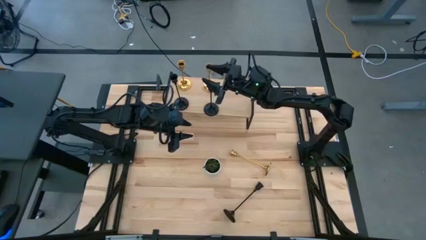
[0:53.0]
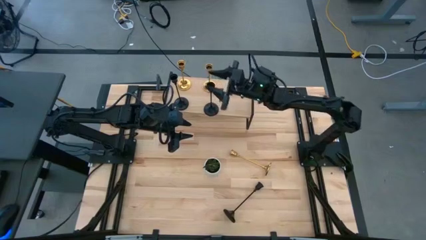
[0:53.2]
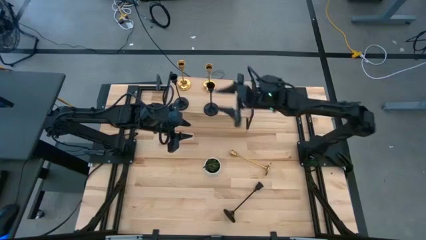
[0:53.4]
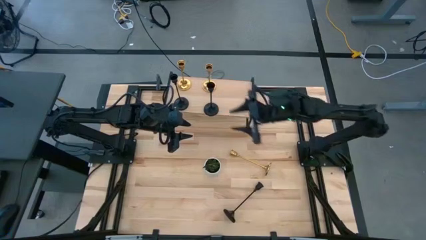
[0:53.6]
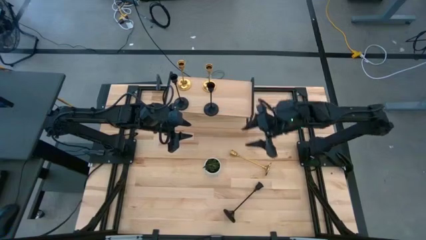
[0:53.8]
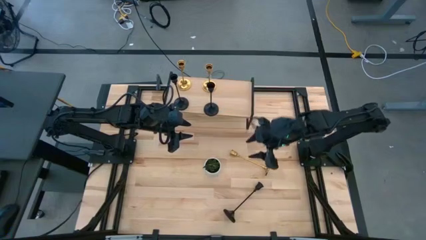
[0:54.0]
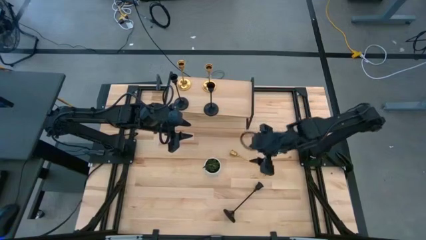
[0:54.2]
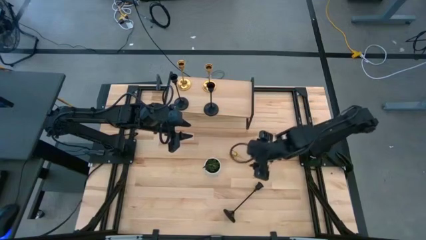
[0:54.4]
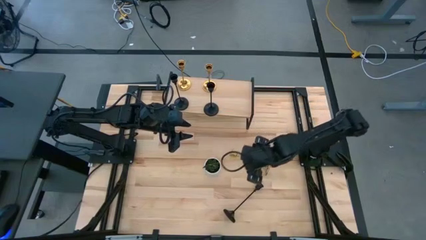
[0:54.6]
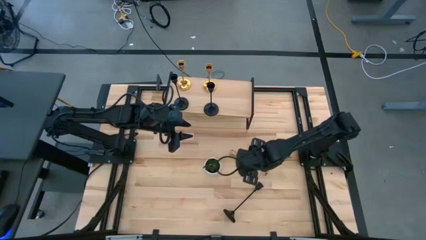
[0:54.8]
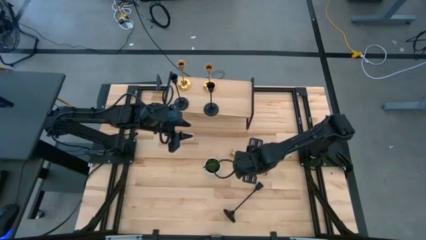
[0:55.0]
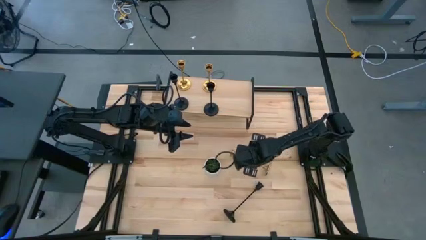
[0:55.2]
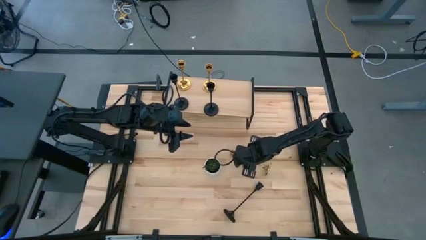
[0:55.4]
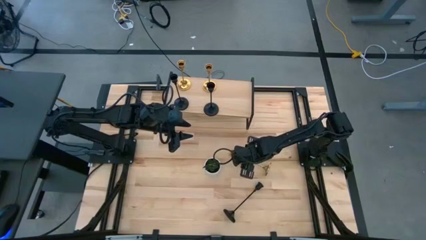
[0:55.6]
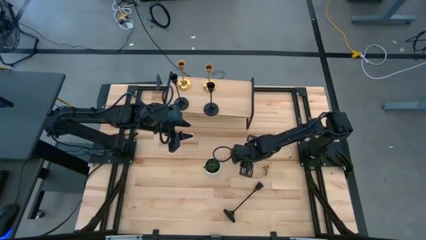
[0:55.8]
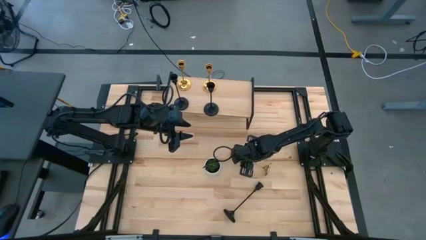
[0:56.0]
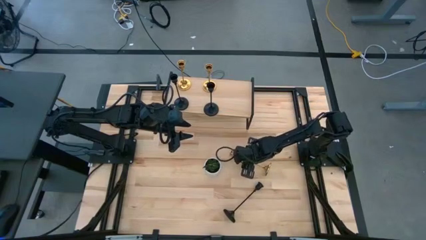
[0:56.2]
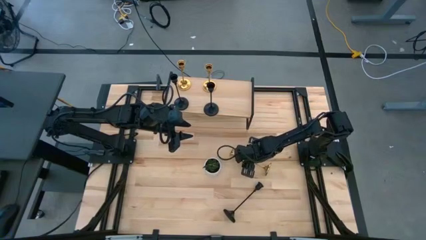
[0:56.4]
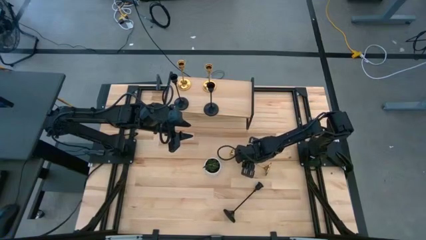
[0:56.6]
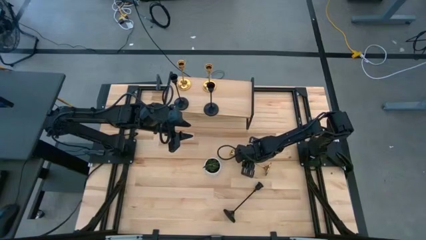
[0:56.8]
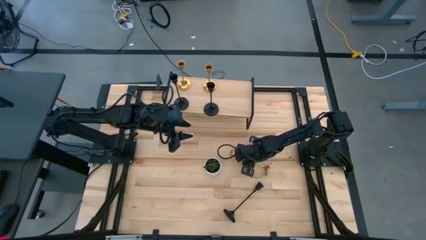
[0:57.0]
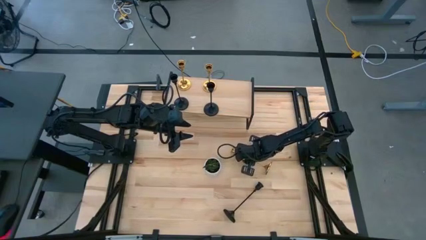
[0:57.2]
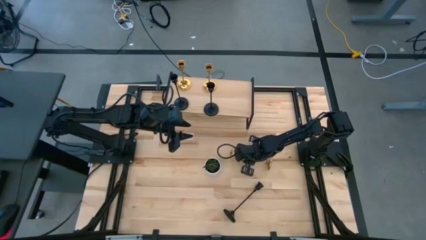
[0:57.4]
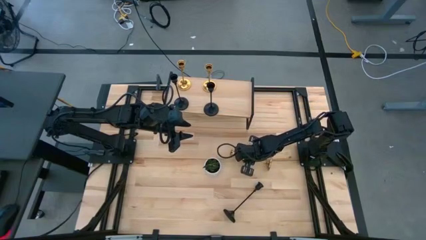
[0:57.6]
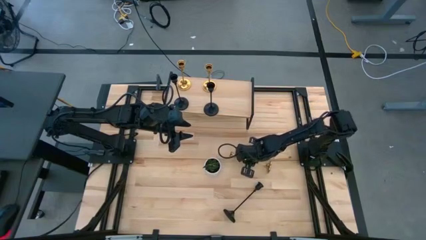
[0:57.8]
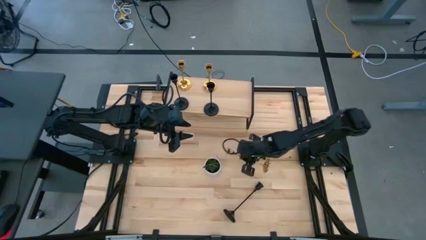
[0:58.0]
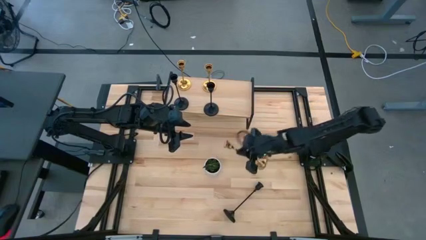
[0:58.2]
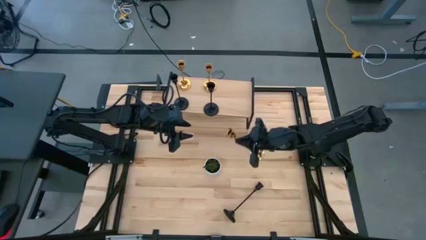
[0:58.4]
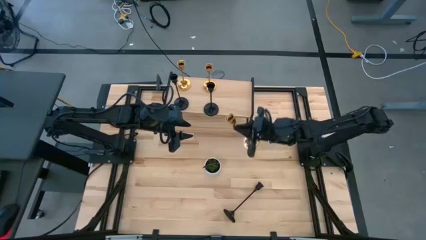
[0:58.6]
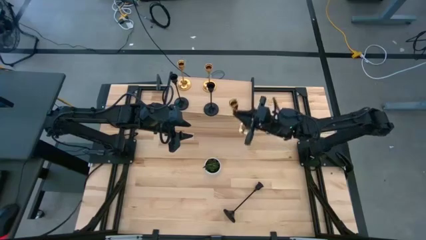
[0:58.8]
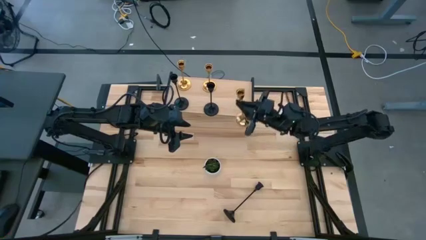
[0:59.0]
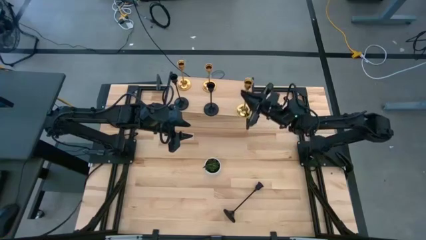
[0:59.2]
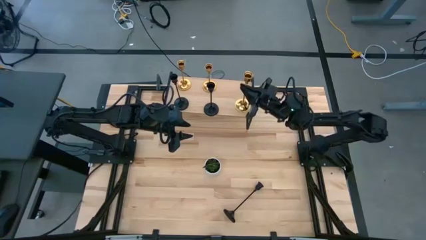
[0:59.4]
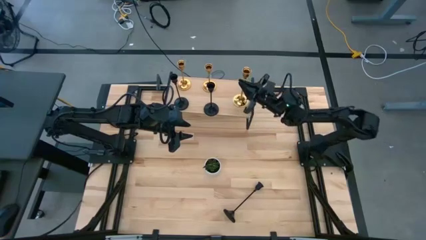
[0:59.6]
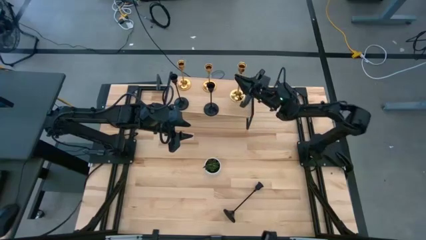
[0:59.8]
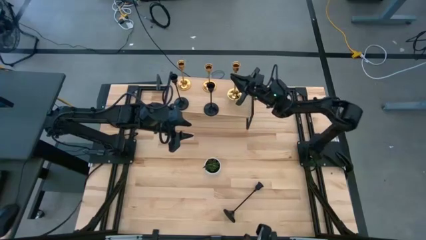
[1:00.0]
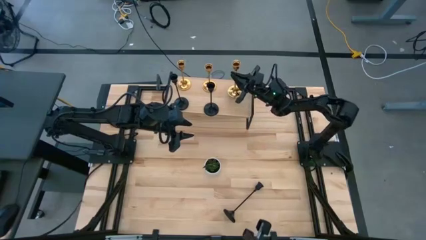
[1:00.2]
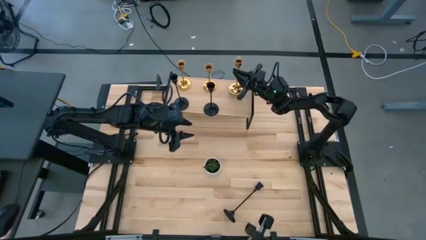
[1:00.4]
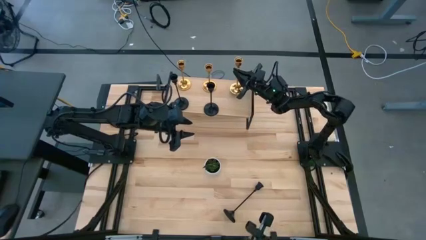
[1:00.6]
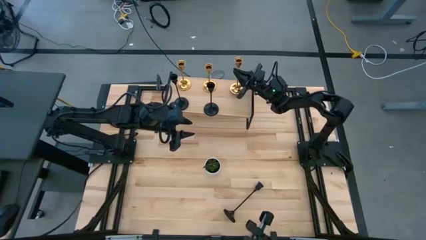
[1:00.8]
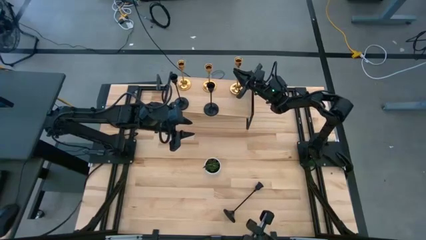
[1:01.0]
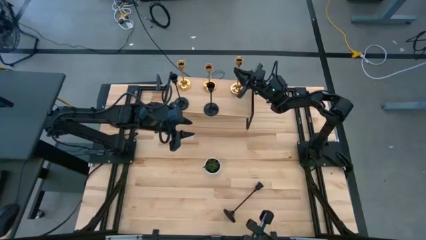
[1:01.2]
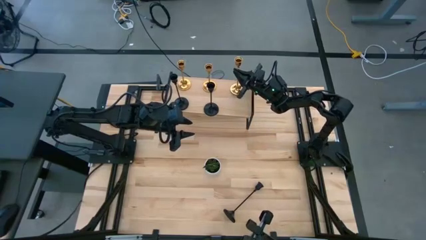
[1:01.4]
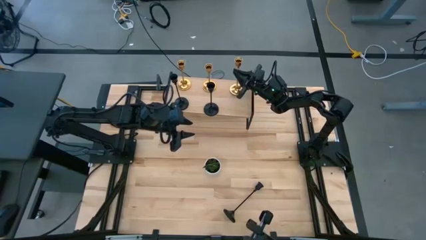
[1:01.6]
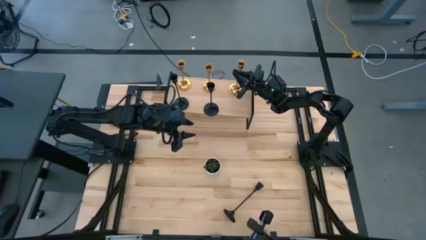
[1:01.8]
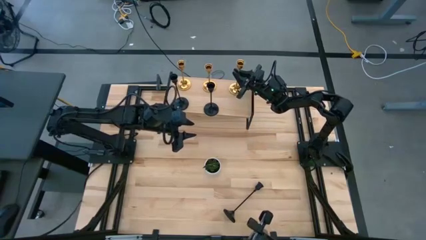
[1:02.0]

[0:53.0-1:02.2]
Task: Pick & Place candle stick holders
Put the gold candle holder on the shelf aligned with the other gold candle holder

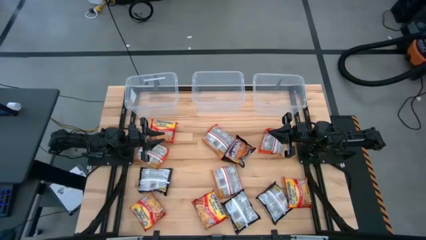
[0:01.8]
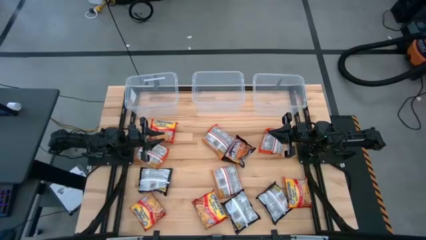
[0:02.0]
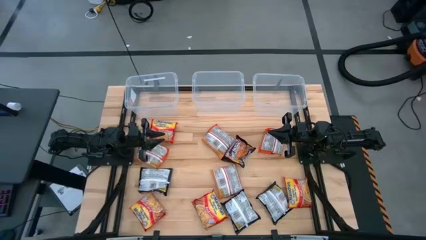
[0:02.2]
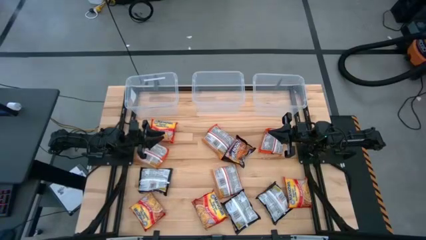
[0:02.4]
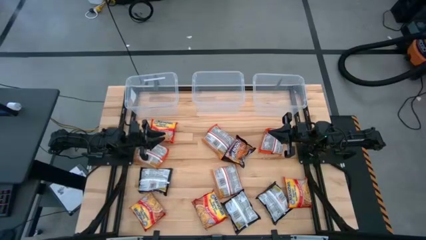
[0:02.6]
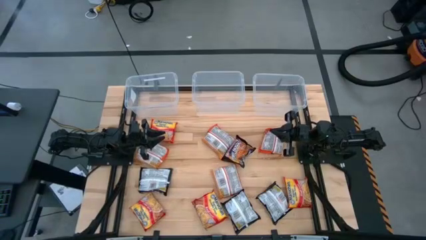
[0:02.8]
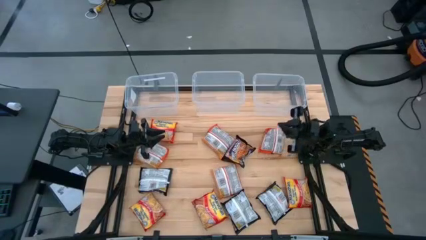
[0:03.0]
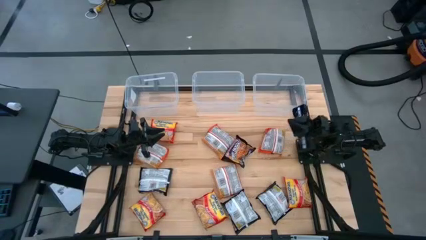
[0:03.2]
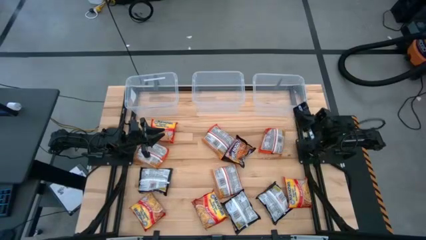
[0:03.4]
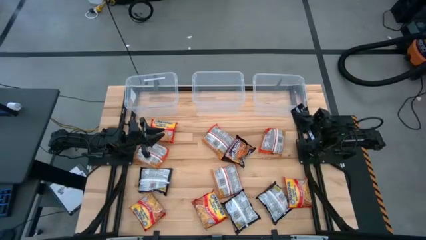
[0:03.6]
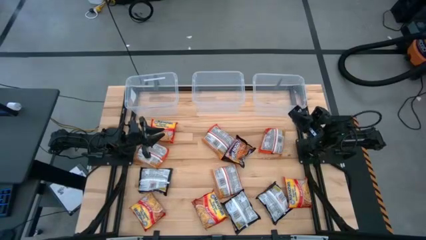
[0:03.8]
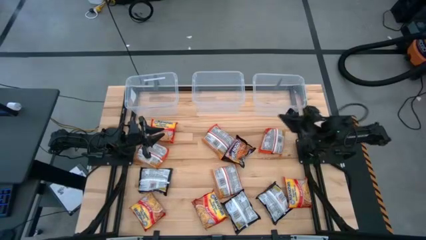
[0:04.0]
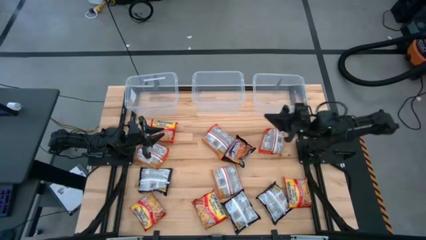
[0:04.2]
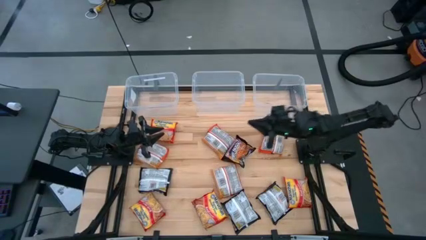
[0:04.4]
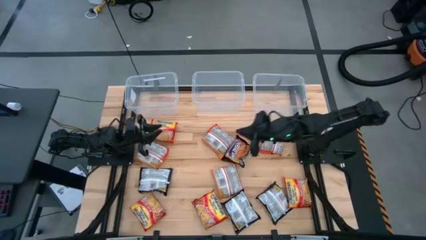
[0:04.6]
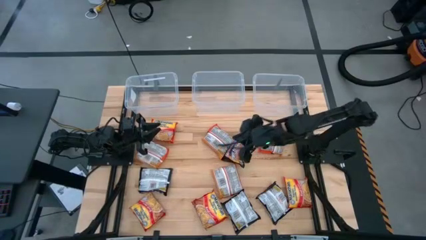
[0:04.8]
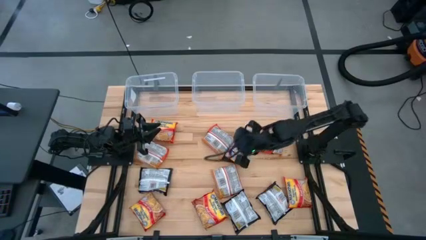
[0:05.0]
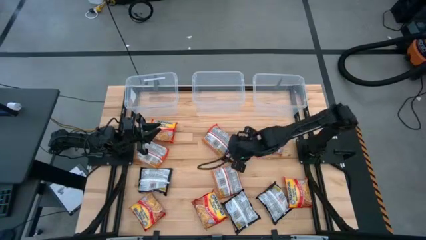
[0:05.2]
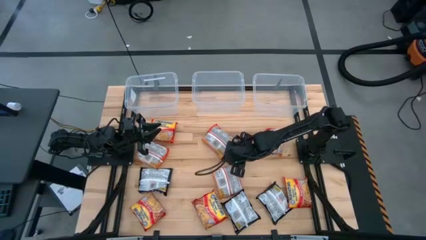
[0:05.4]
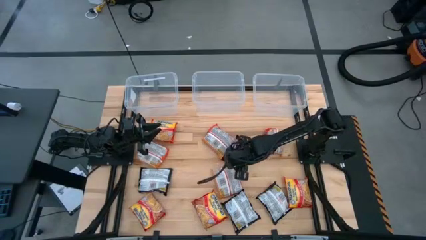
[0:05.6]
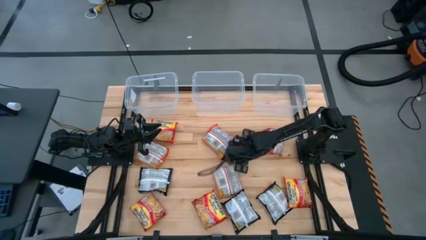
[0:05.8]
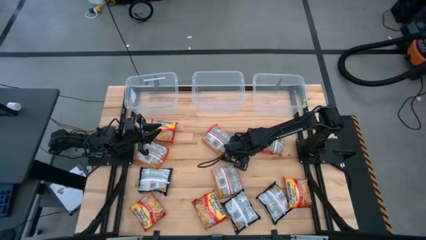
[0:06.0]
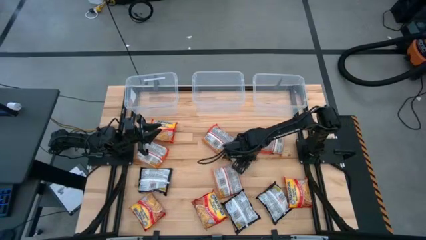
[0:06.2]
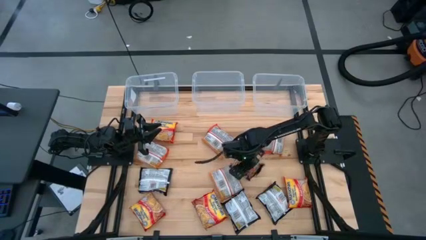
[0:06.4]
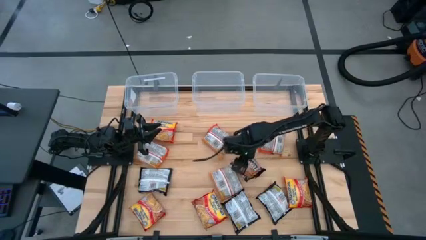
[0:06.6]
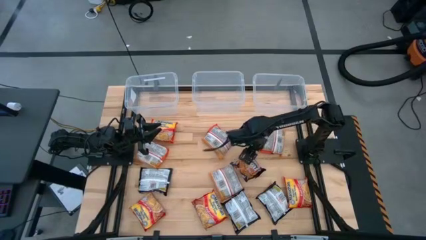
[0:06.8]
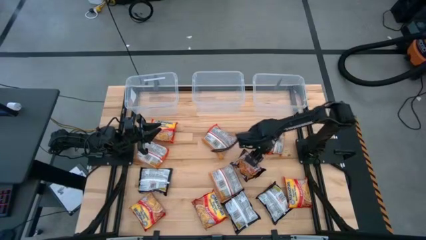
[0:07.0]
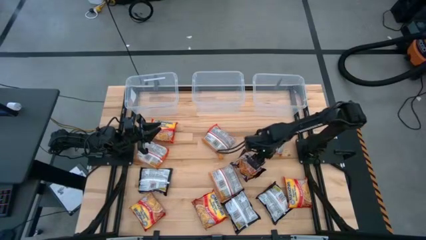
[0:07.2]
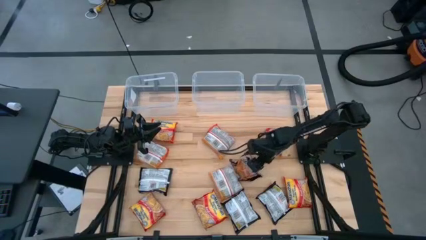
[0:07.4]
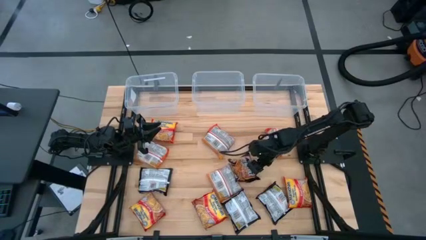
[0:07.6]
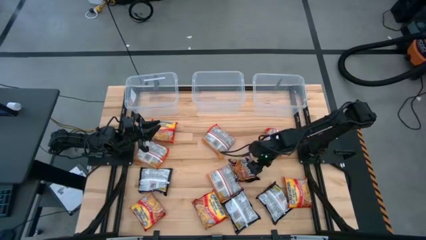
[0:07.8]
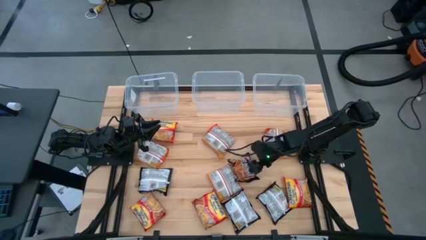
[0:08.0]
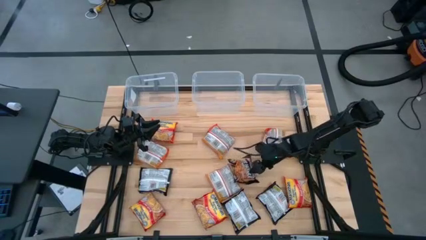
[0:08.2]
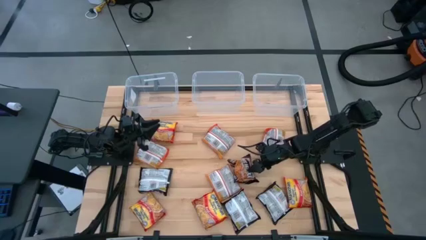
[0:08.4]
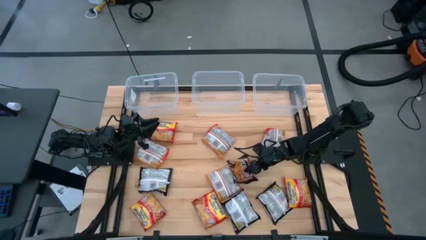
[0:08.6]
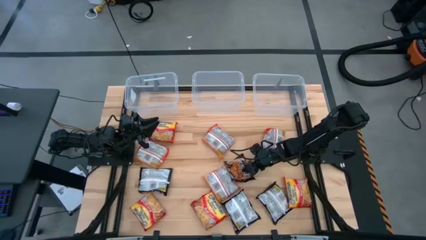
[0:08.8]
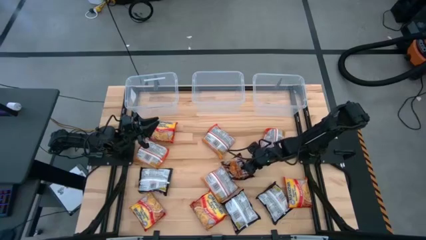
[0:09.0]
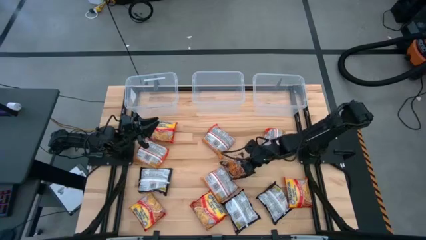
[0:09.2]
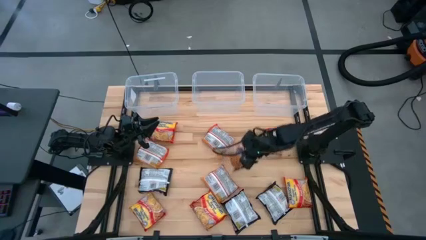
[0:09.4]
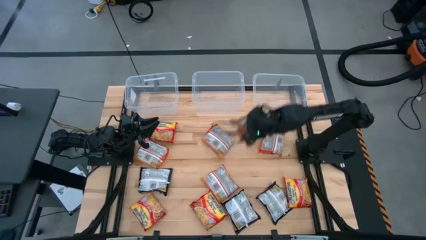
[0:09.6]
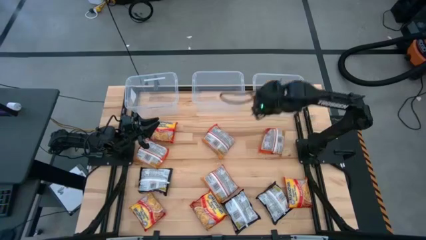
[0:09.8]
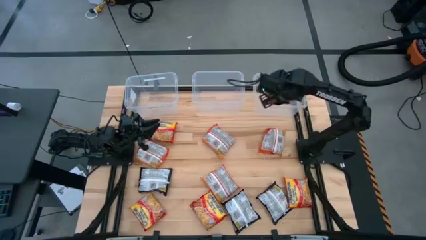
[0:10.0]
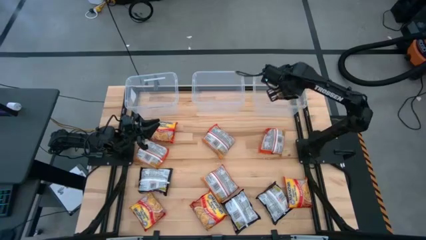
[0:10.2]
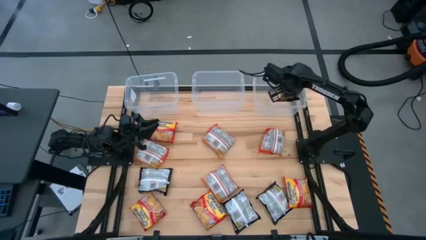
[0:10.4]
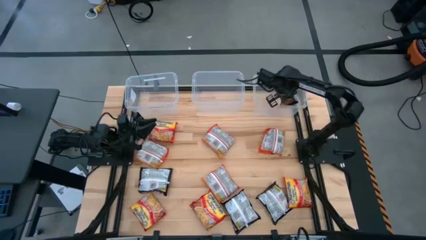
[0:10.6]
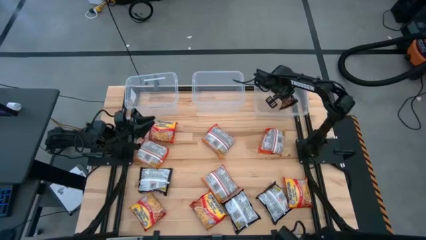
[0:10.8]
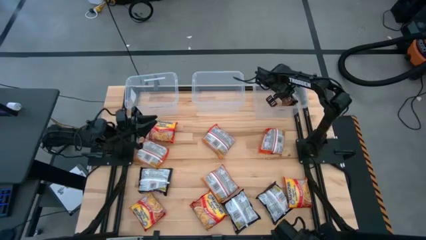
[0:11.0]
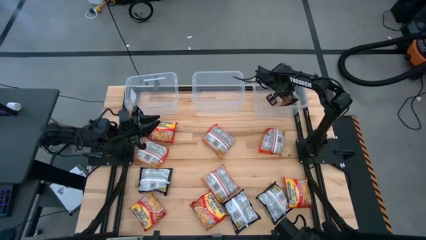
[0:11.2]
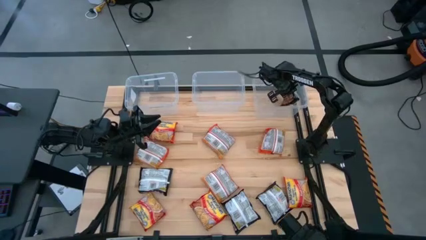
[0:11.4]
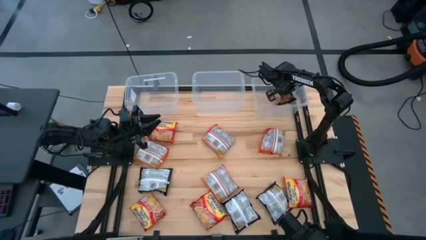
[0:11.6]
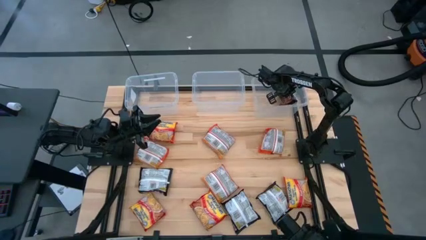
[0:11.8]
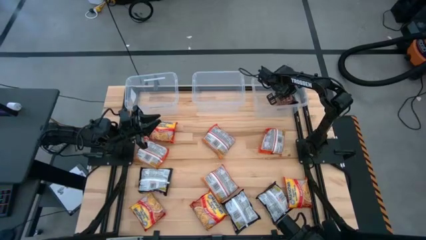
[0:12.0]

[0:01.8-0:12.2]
Task: Sort Maruchan noodles
Put the black noodle pack into the top right transparent bin
